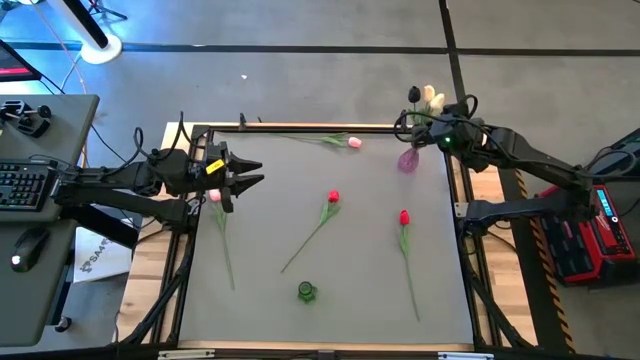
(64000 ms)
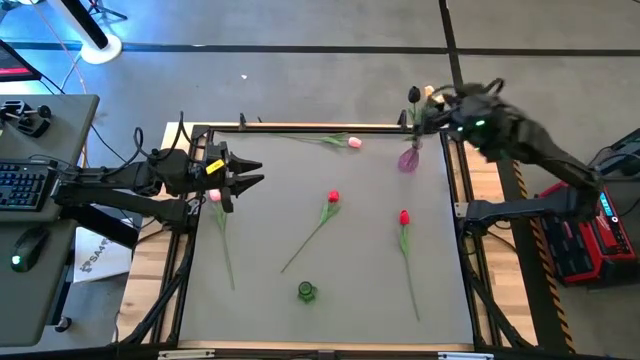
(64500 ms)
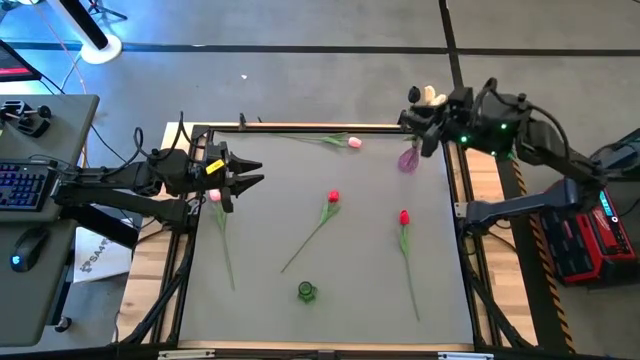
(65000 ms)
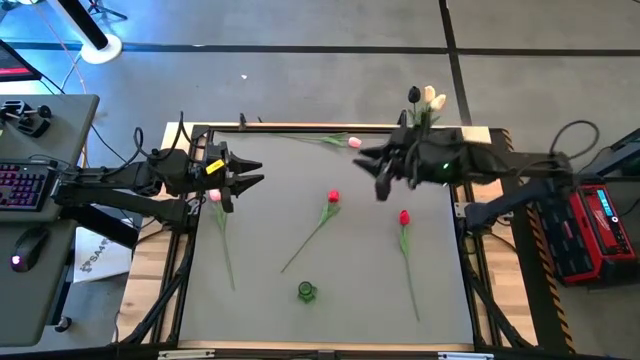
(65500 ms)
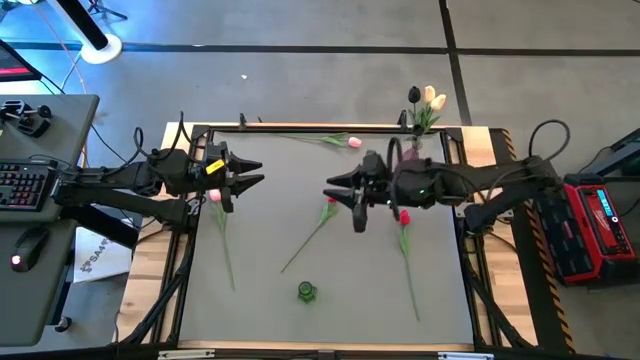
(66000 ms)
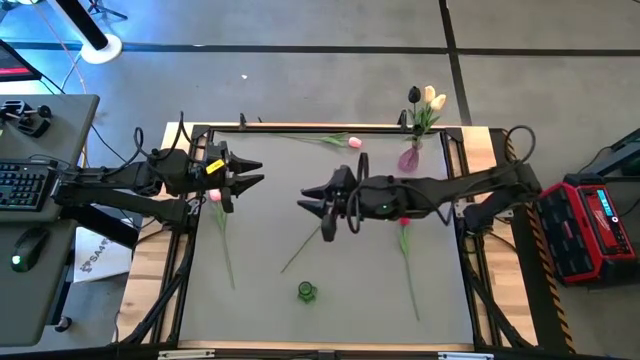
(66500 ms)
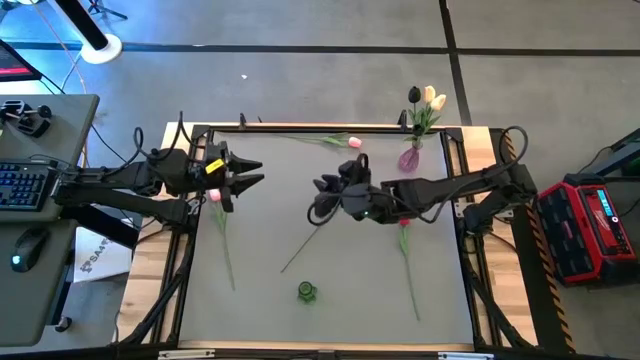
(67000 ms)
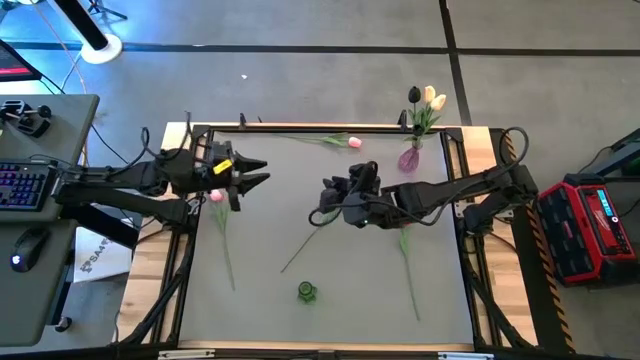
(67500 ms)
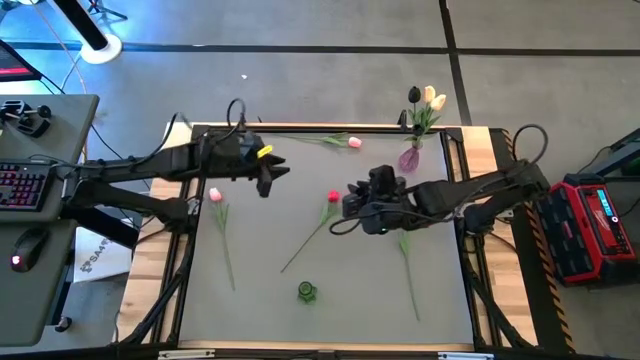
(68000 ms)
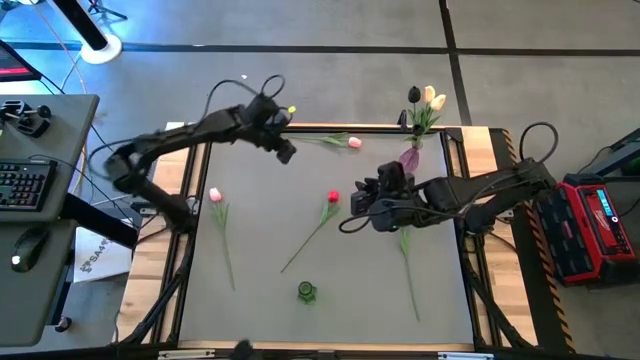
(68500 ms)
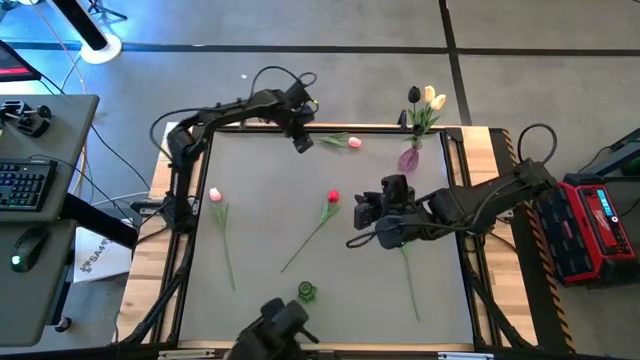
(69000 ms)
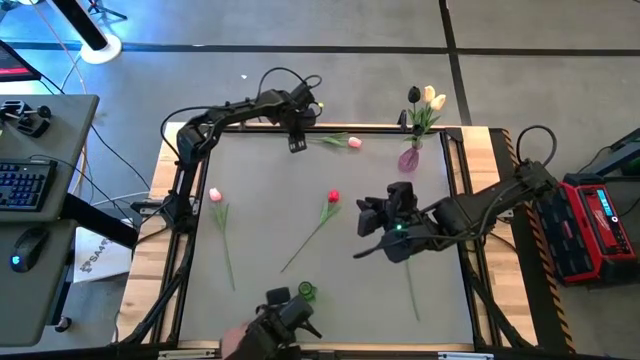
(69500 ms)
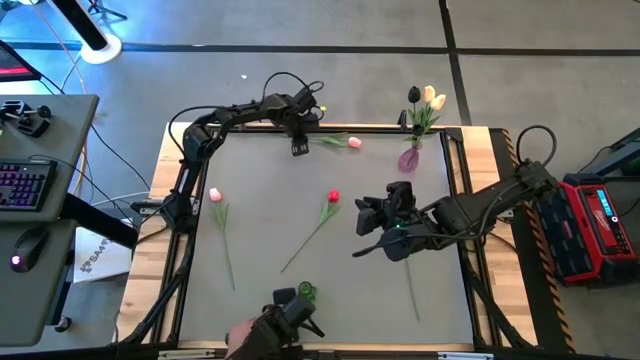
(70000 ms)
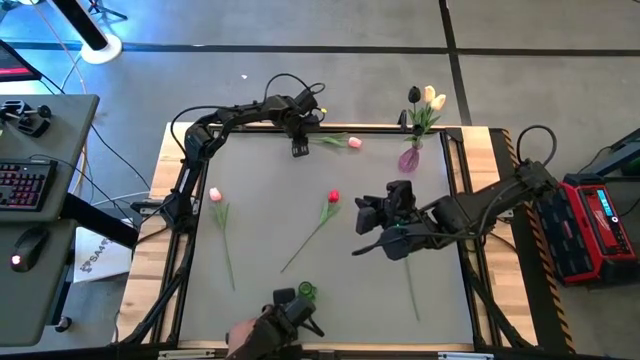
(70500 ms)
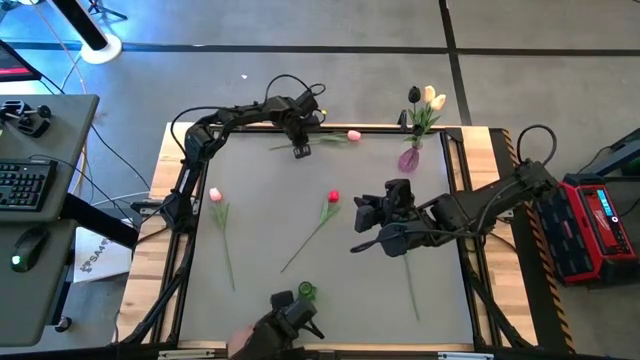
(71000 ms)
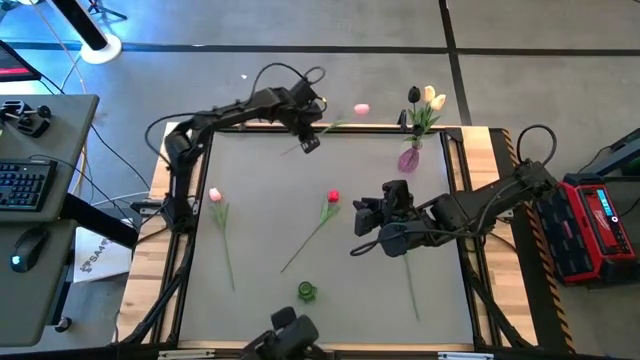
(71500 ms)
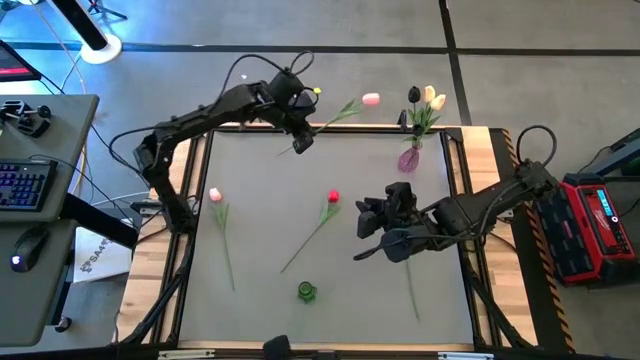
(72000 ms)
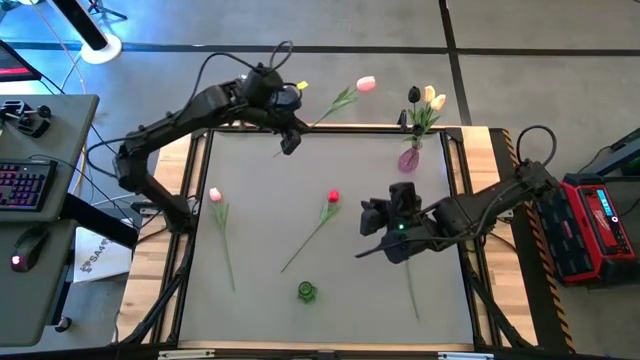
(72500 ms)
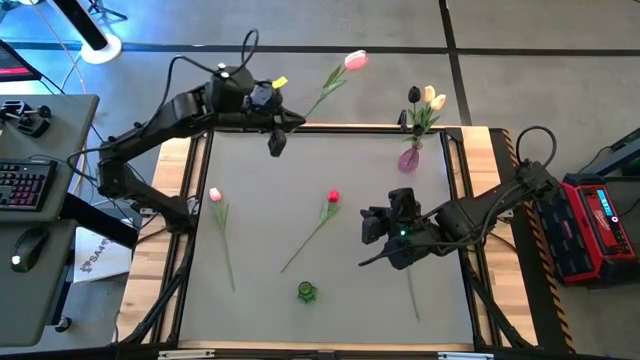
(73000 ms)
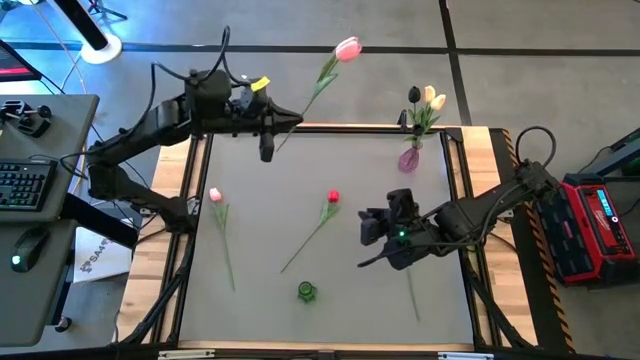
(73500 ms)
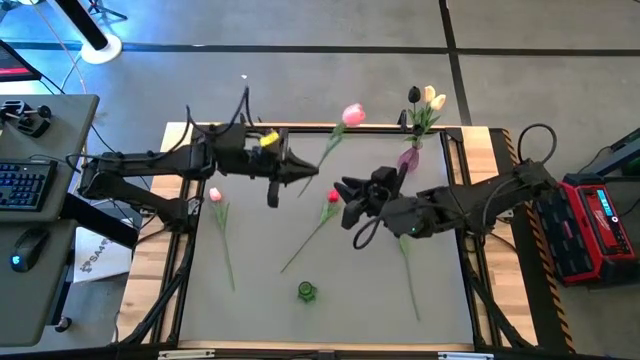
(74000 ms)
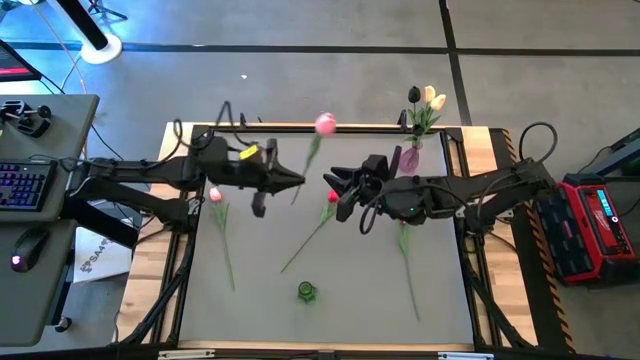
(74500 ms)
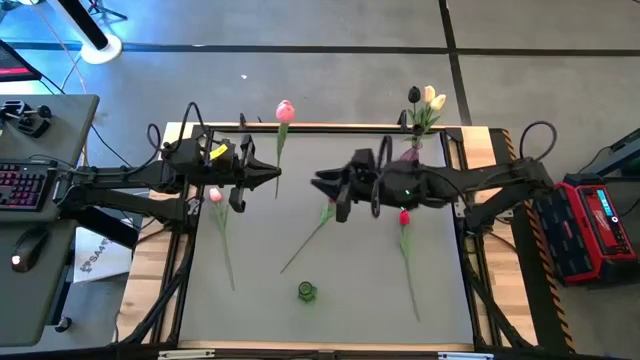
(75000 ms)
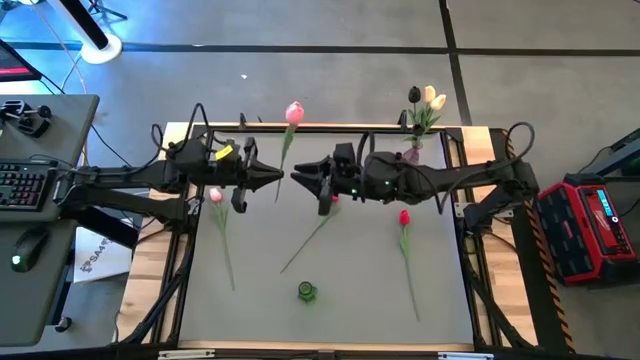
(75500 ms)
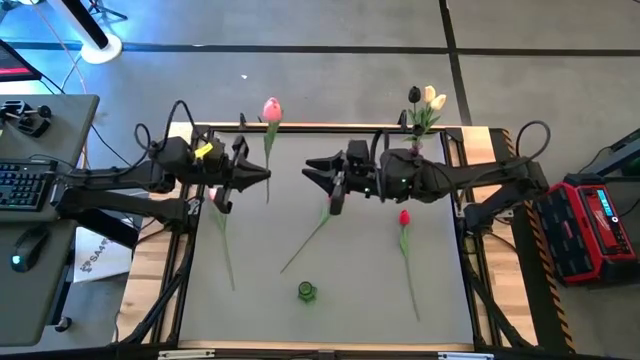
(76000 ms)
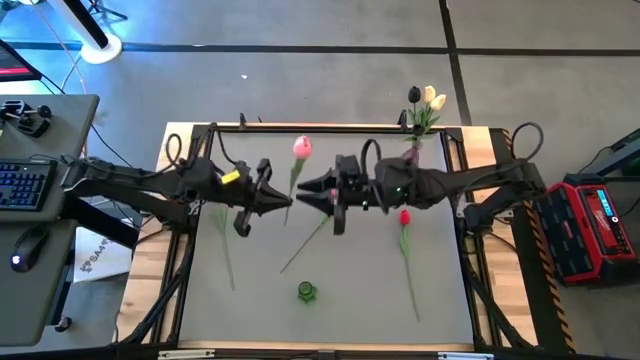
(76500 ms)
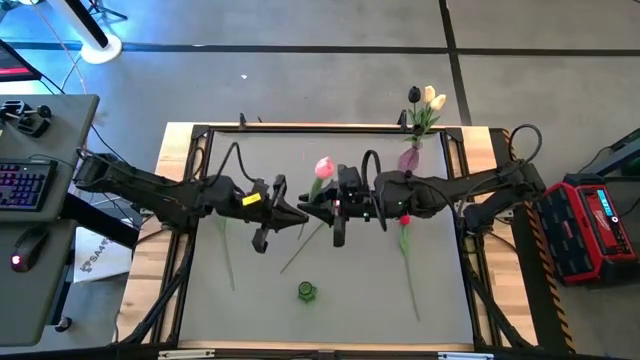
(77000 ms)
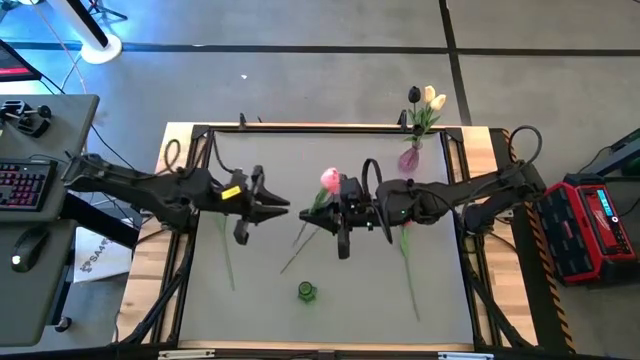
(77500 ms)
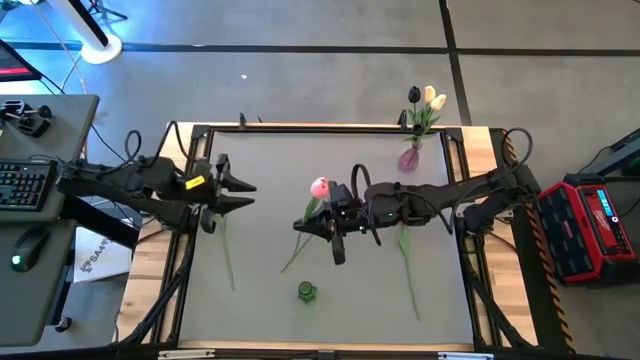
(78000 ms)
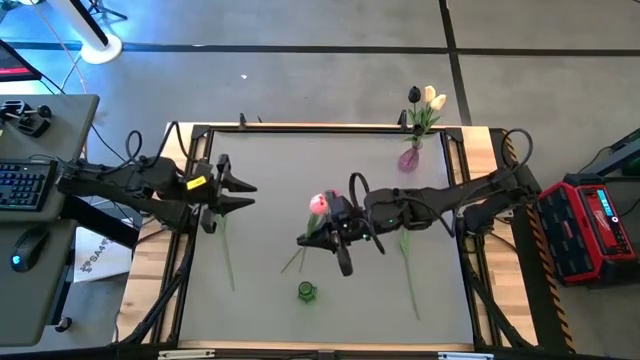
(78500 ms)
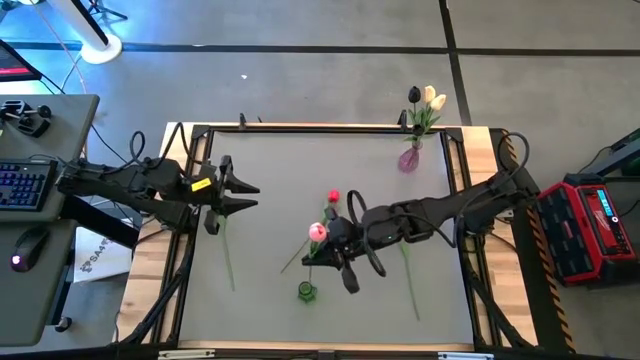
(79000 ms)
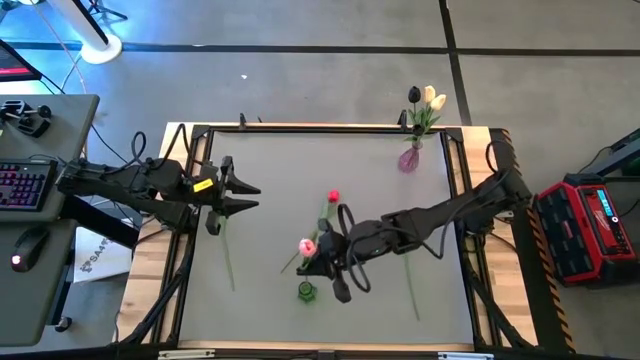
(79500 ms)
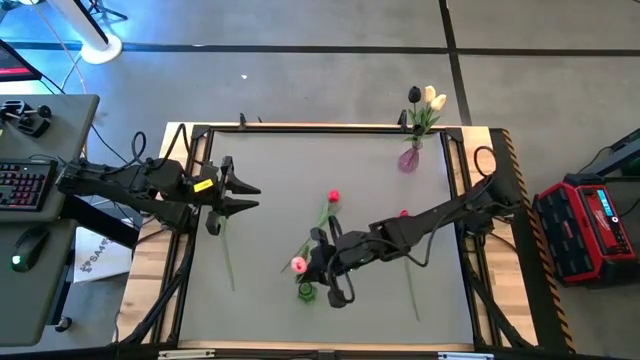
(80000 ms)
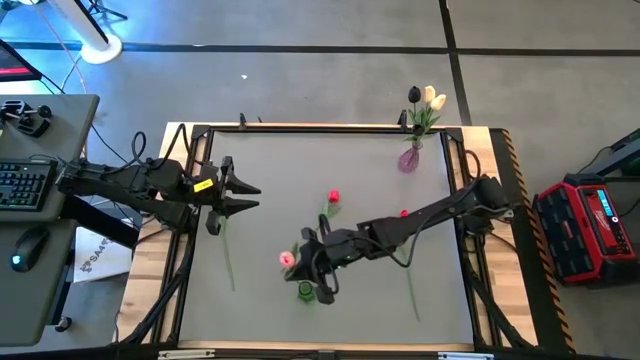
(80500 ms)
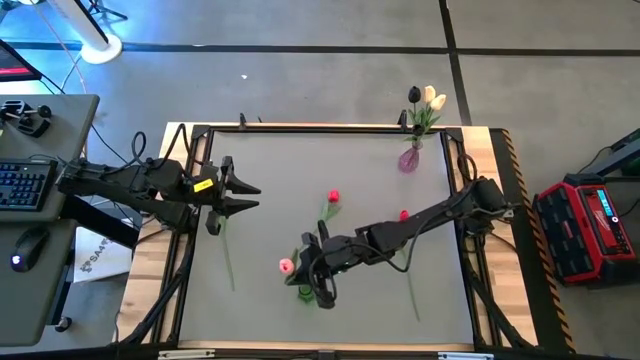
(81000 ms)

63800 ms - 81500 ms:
Task: Sort flowers into vase by color
Put the top pink flower into the green vase
